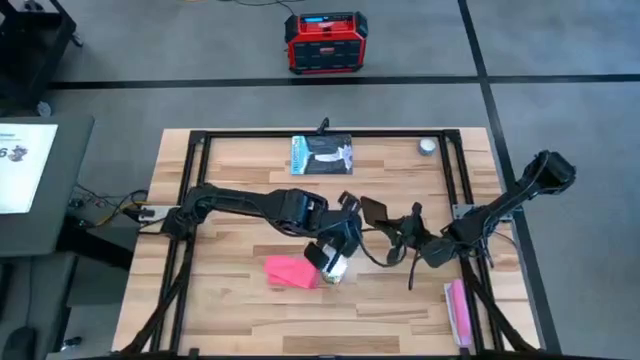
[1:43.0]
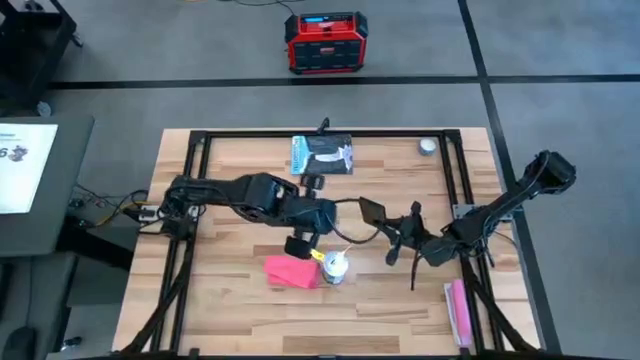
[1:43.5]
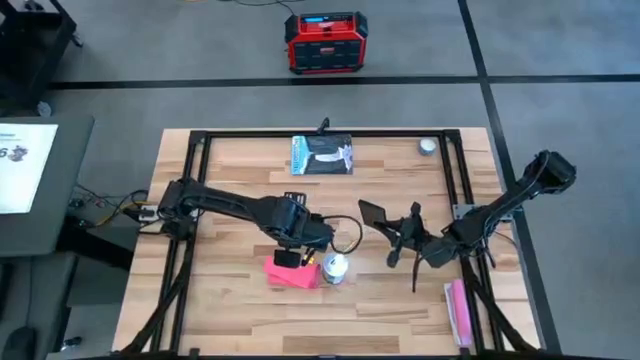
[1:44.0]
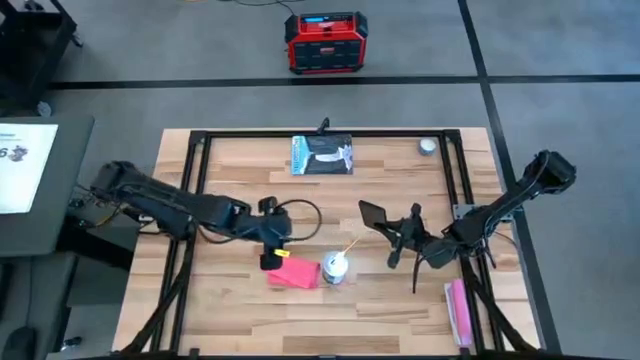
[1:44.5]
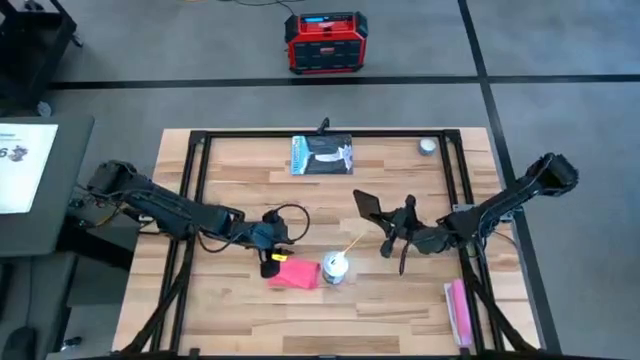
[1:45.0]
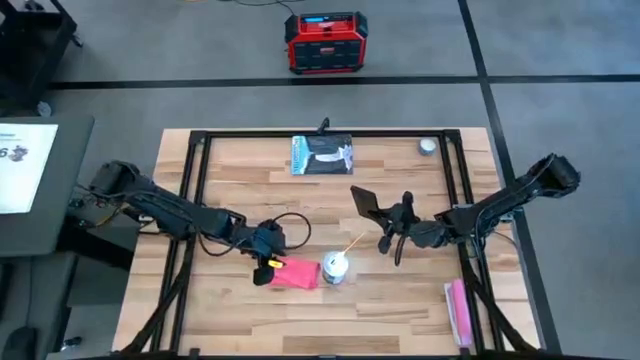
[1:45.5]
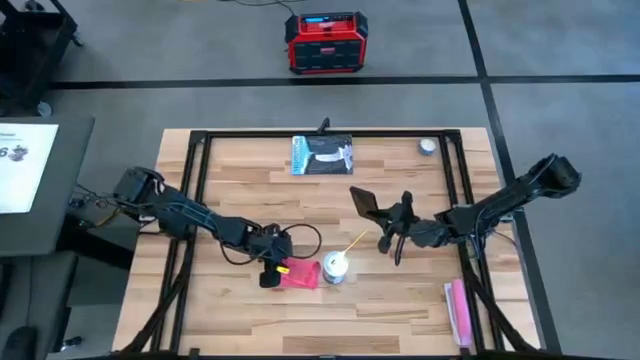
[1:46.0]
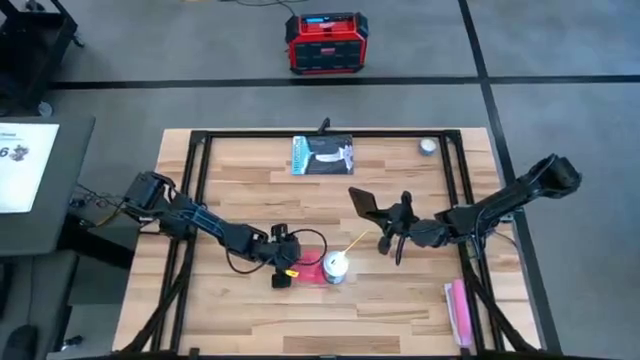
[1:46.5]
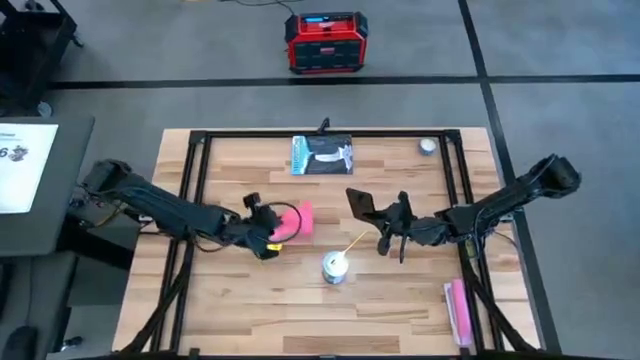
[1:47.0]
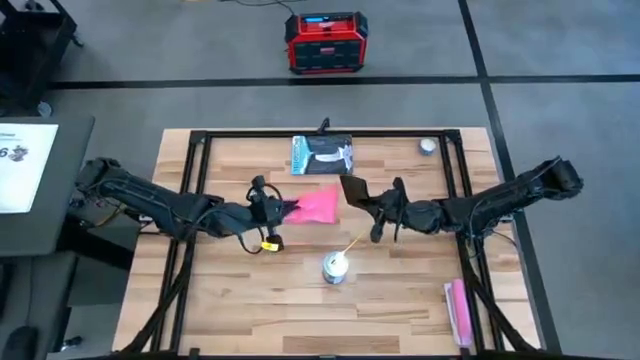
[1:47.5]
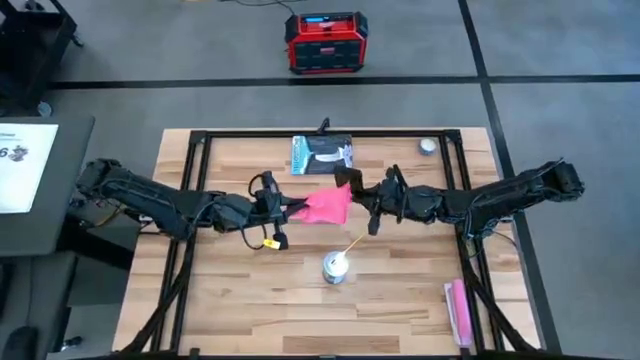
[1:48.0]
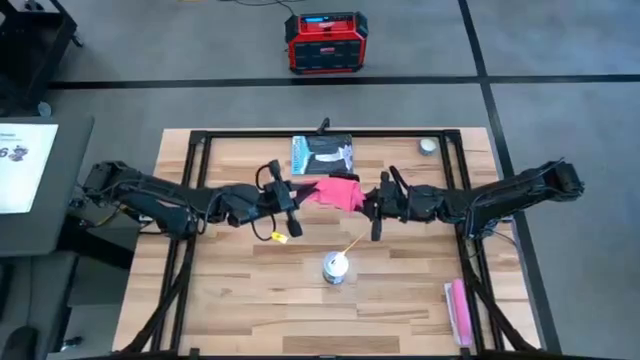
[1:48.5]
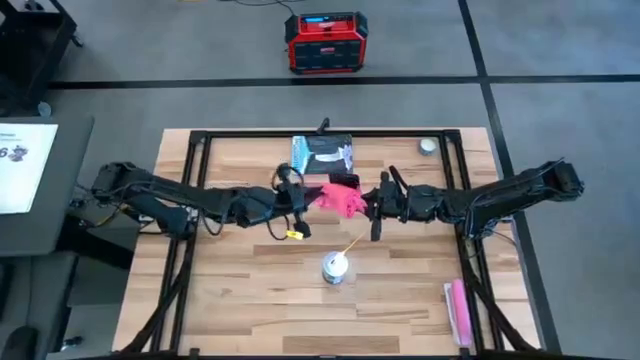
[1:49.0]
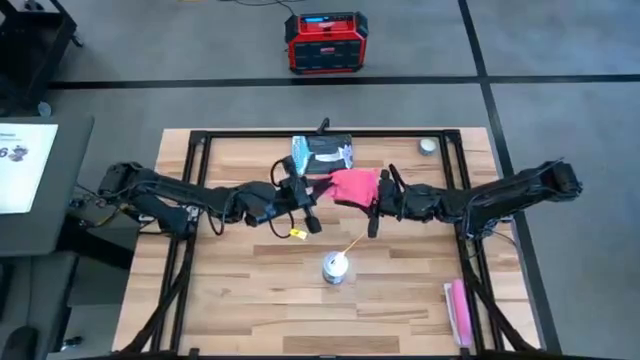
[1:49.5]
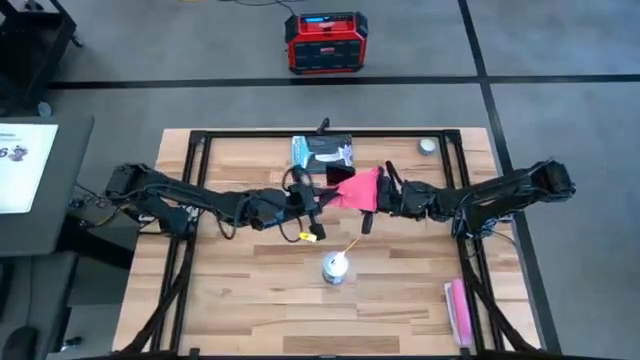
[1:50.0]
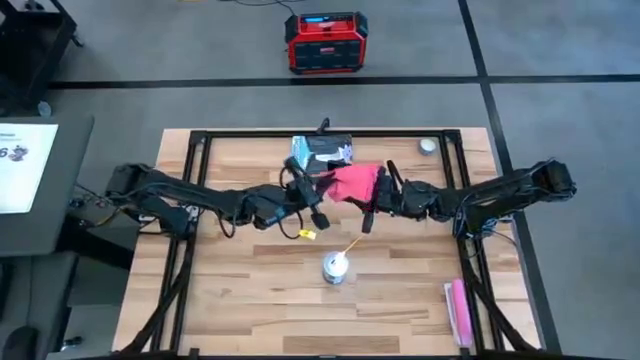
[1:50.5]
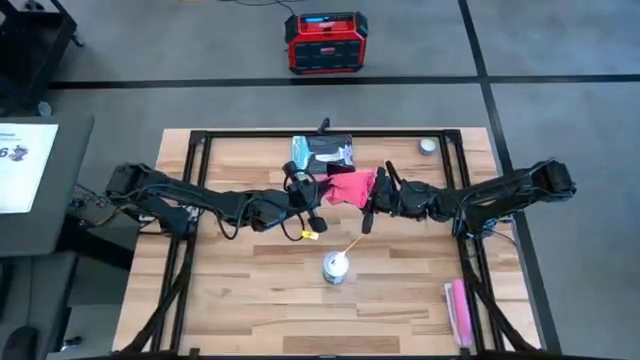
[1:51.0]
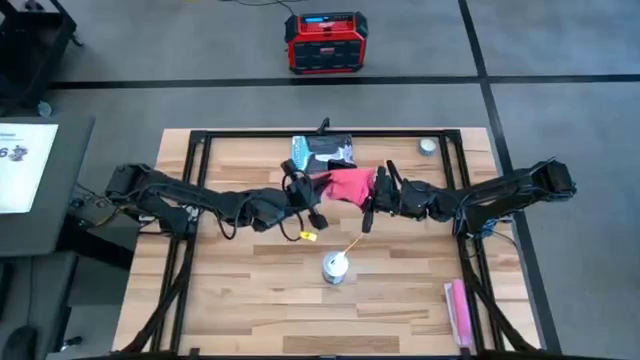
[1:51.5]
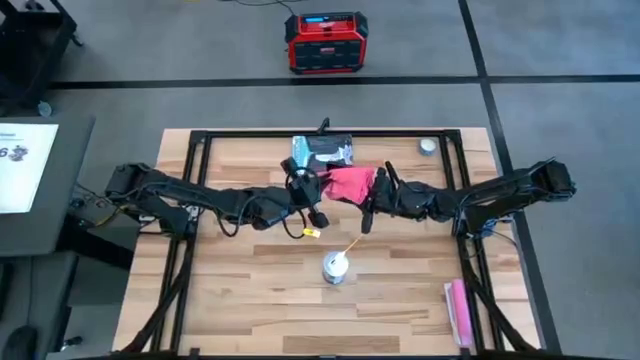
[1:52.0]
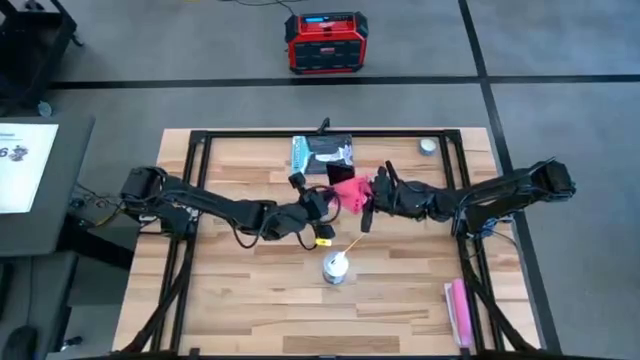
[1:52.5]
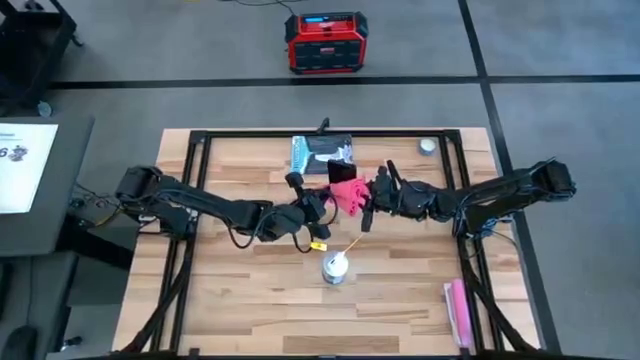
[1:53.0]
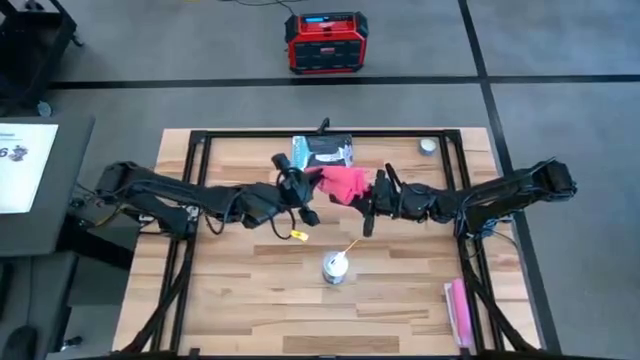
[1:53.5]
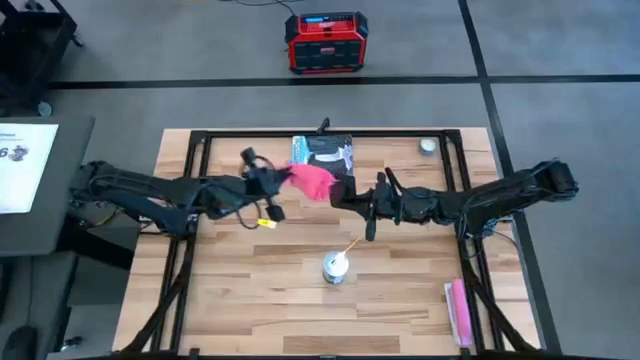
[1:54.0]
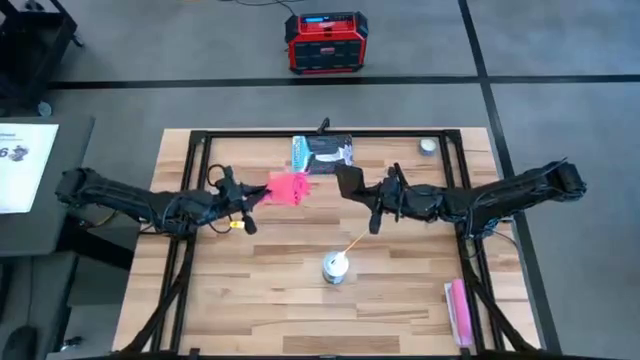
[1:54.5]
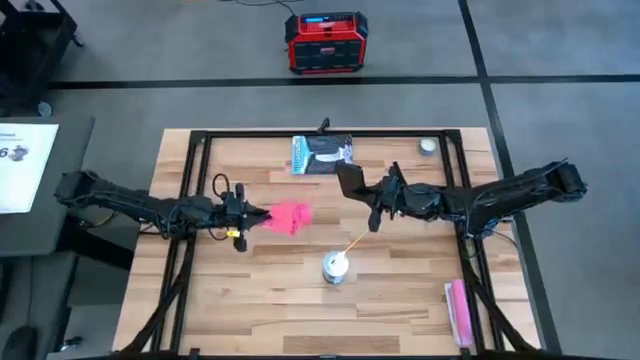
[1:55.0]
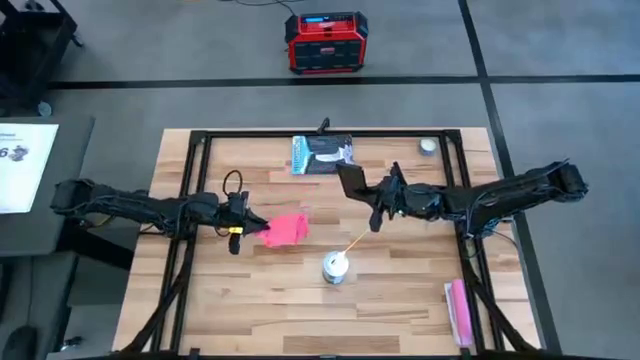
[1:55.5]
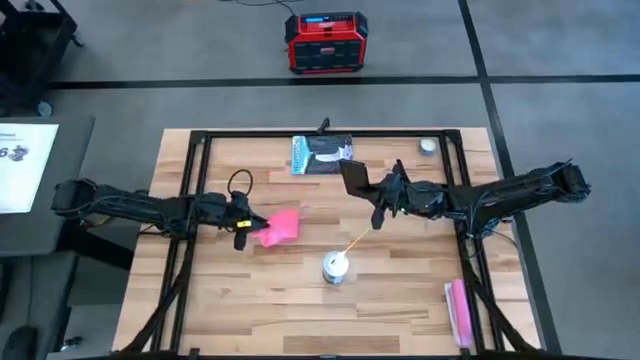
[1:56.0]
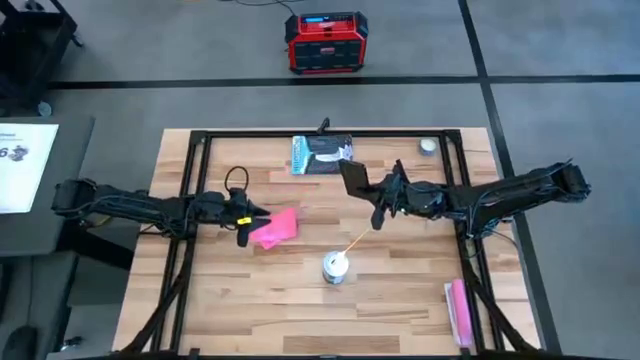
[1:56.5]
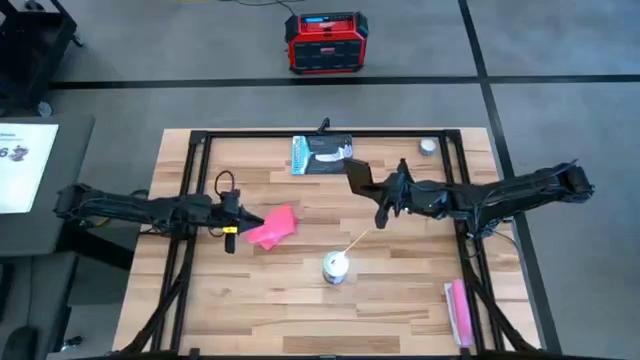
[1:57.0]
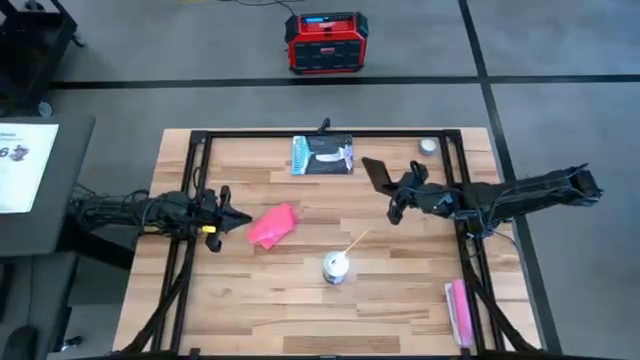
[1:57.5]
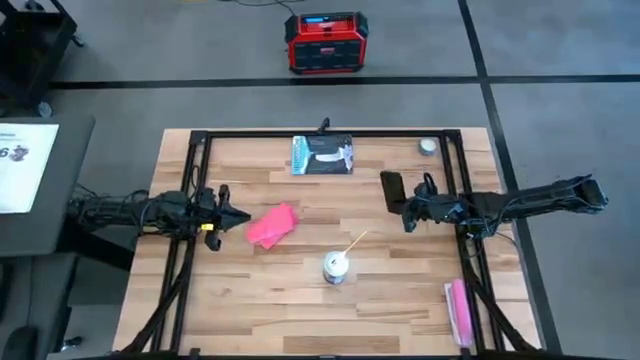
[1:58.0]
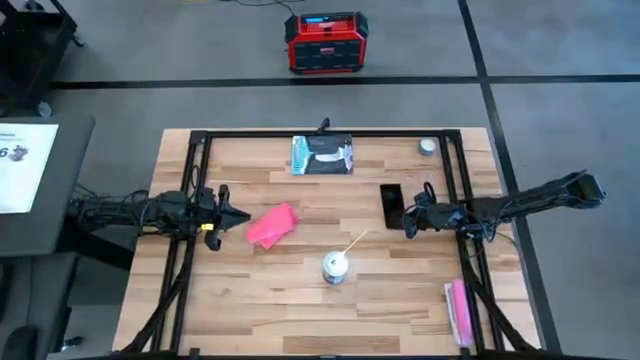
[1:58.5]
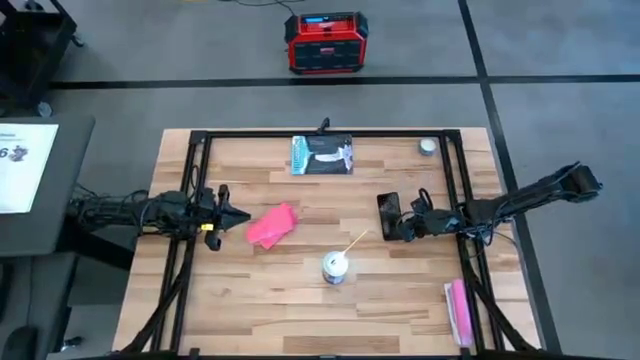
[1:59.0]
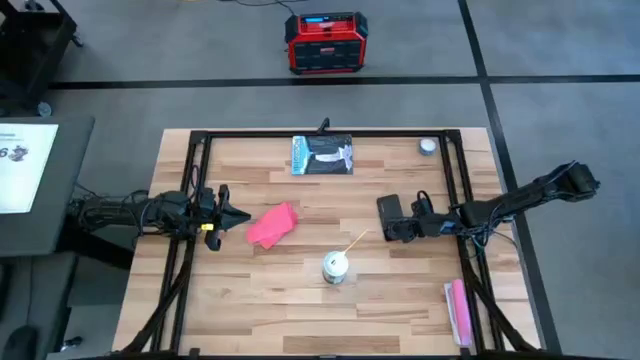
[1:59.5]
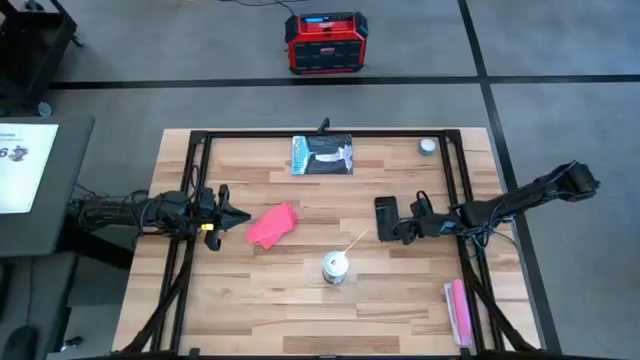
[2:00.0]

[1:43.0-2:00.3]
Task: Apply microfiber cloth
Wipe the back of the cellphone with the pink microfiber cloth

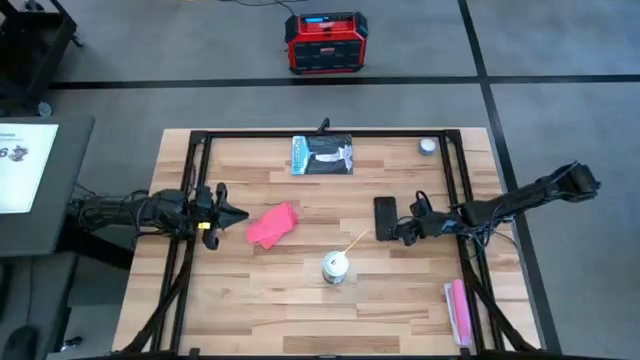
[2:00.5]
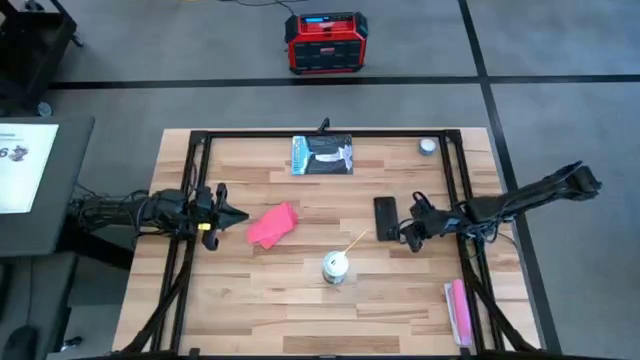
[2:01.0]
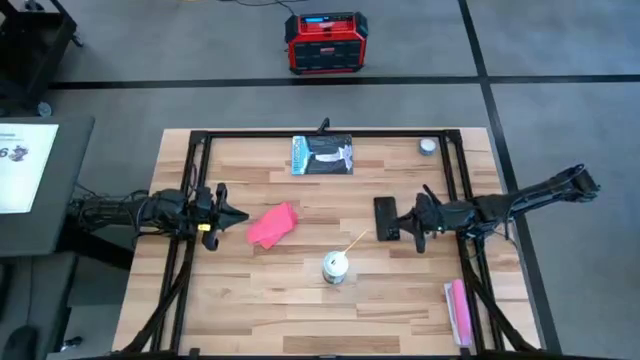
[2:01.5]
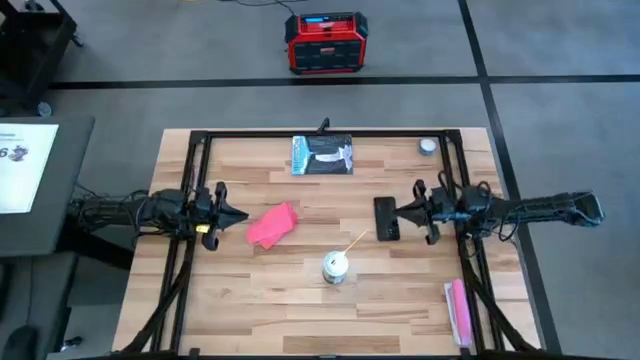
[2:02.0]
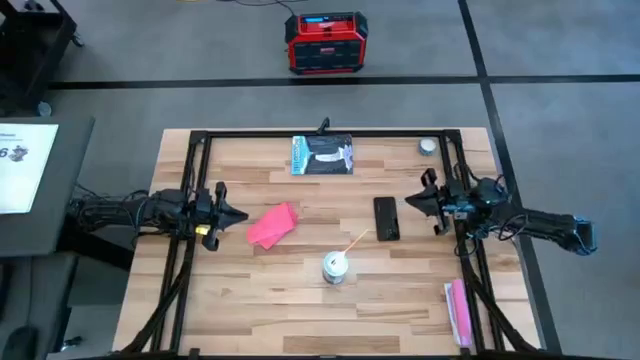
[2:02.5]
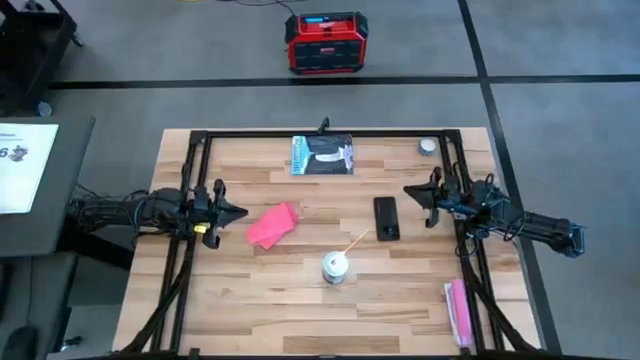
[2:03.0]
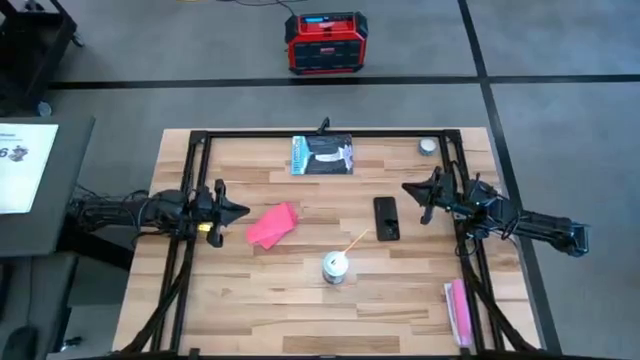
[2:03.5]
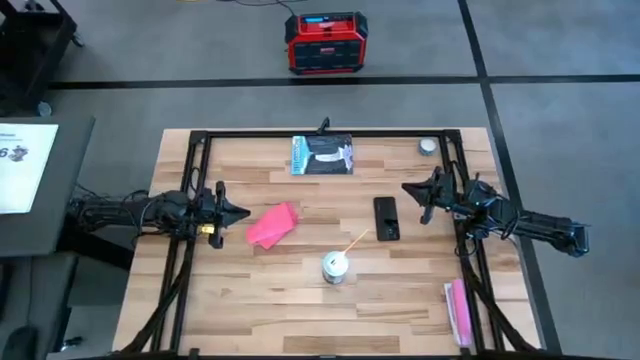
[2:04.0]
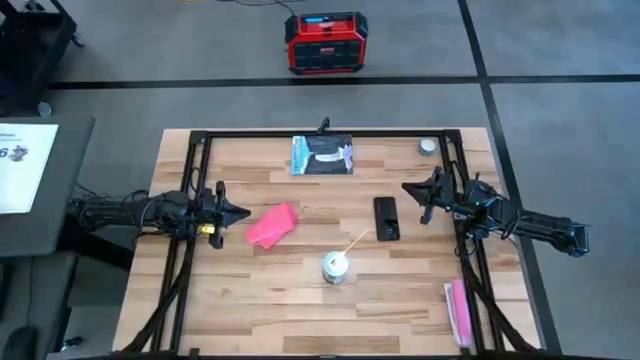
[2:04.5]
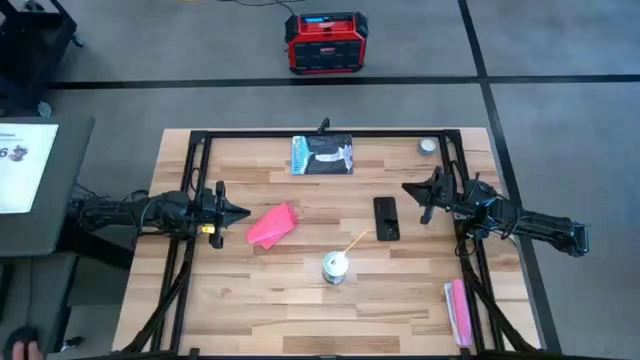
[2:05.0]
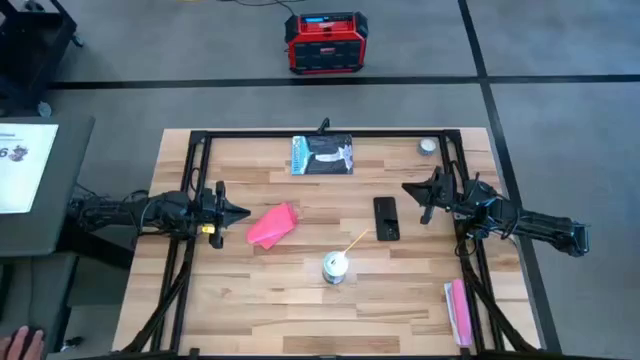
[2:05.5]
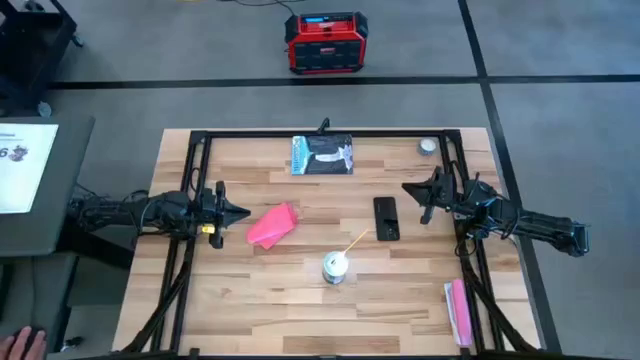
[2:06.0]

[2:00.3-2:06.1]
Return to Home Position
